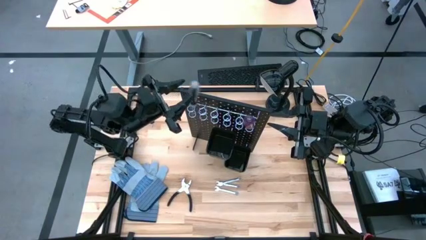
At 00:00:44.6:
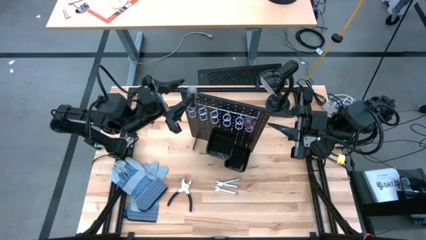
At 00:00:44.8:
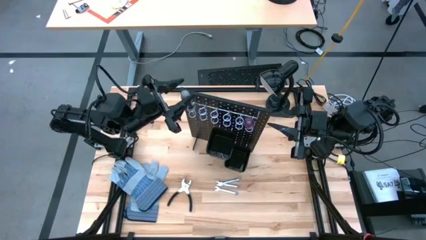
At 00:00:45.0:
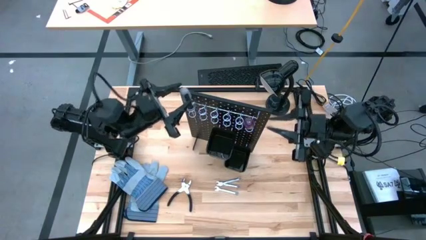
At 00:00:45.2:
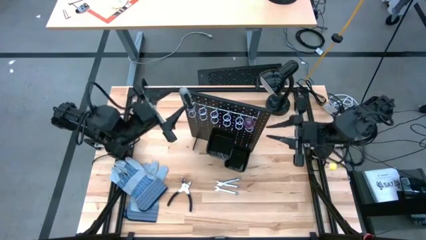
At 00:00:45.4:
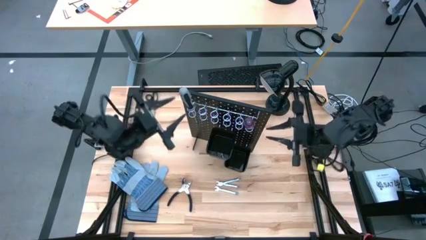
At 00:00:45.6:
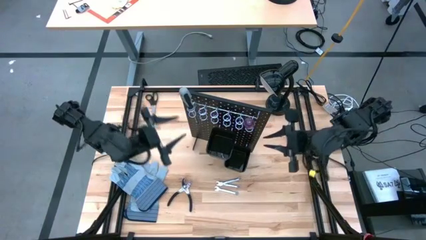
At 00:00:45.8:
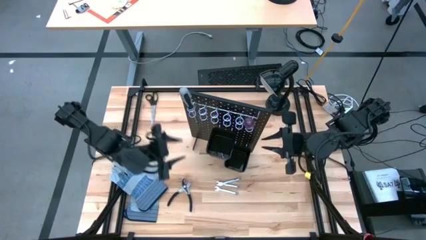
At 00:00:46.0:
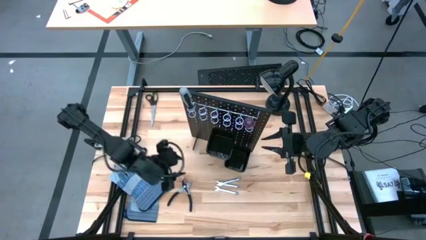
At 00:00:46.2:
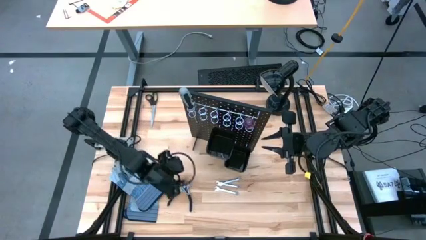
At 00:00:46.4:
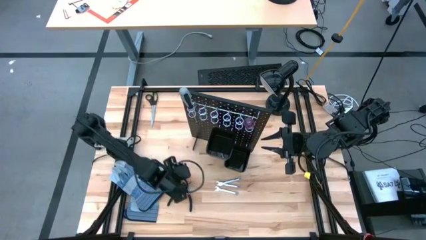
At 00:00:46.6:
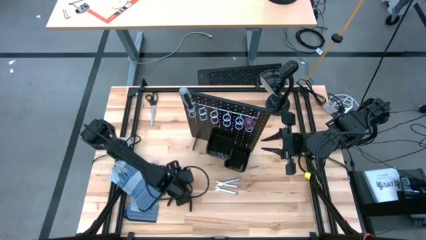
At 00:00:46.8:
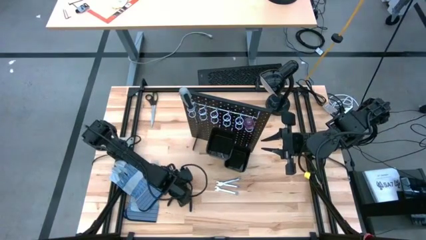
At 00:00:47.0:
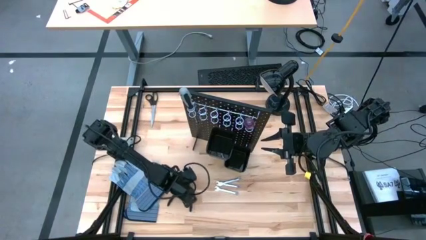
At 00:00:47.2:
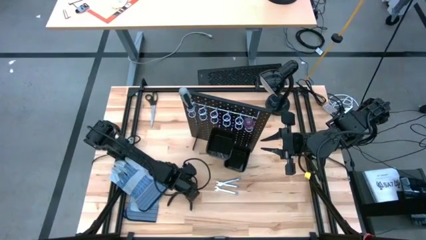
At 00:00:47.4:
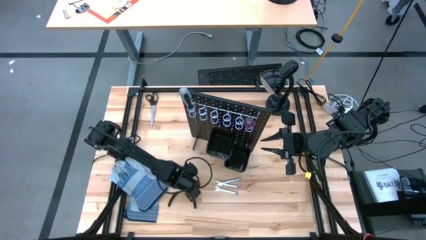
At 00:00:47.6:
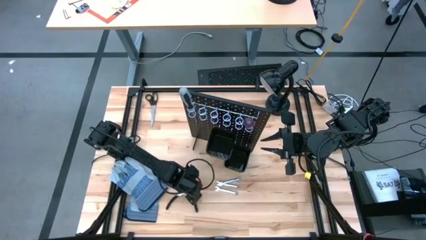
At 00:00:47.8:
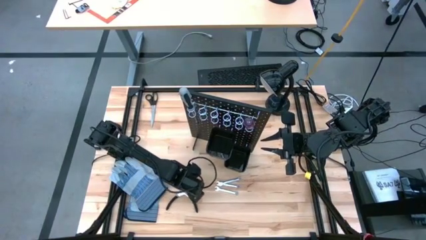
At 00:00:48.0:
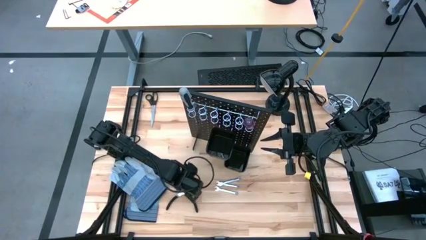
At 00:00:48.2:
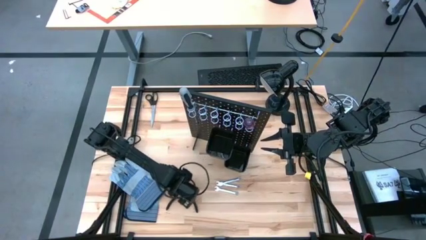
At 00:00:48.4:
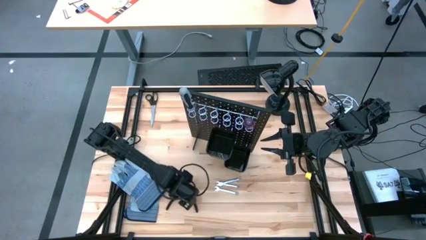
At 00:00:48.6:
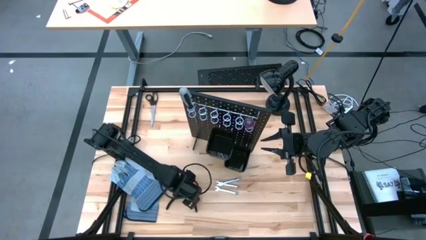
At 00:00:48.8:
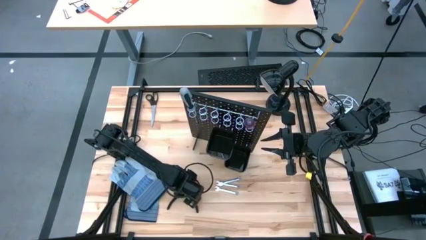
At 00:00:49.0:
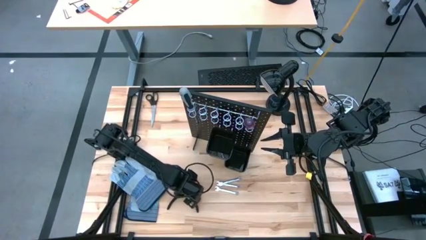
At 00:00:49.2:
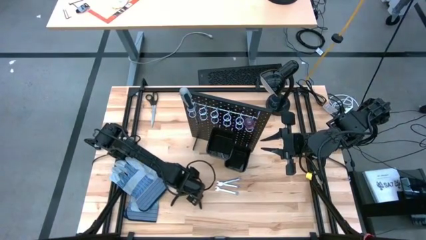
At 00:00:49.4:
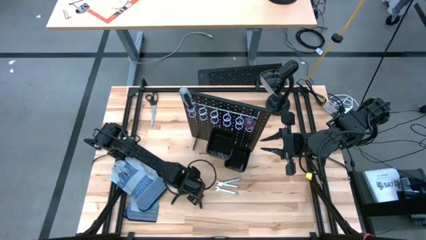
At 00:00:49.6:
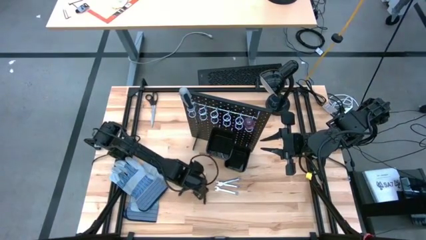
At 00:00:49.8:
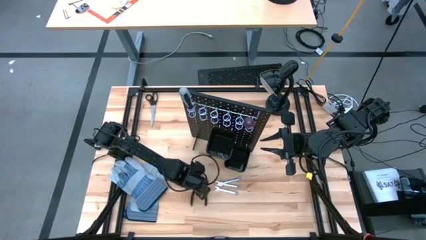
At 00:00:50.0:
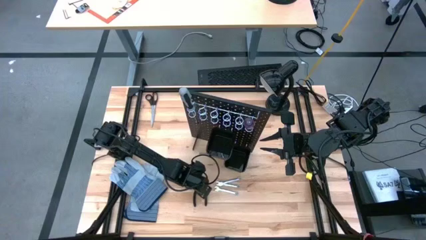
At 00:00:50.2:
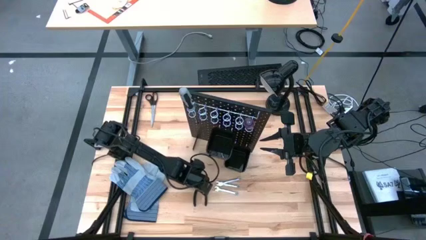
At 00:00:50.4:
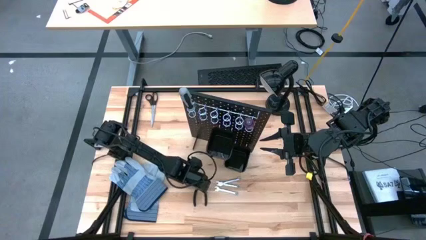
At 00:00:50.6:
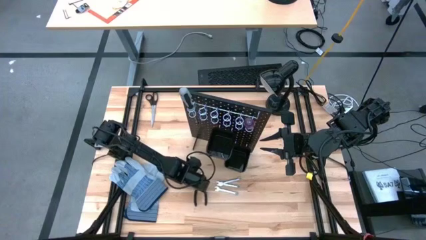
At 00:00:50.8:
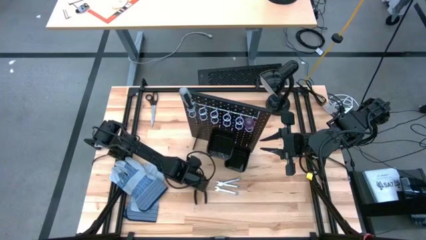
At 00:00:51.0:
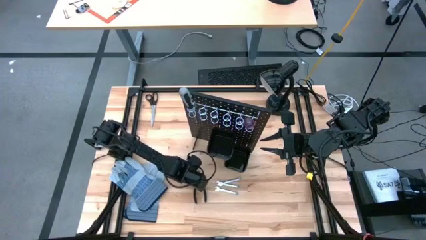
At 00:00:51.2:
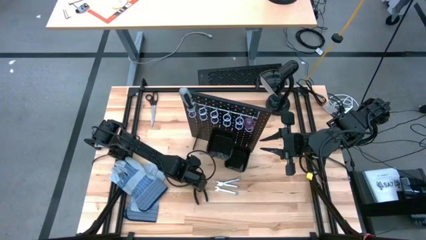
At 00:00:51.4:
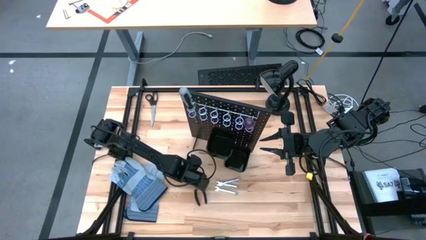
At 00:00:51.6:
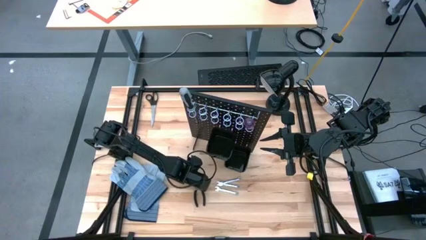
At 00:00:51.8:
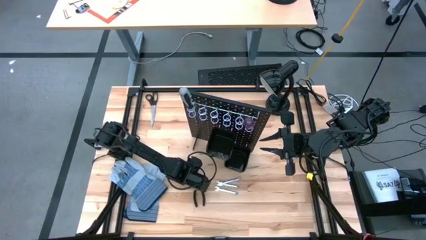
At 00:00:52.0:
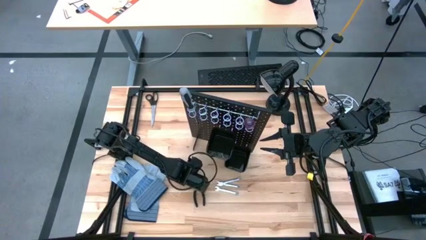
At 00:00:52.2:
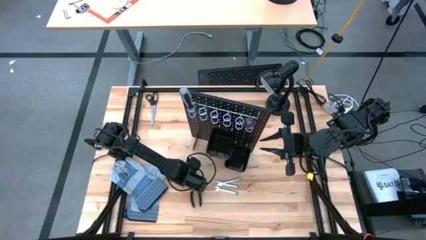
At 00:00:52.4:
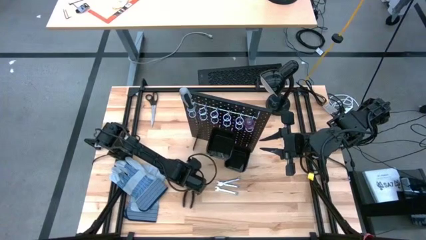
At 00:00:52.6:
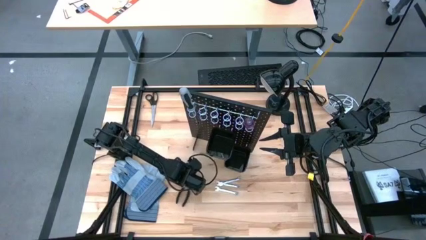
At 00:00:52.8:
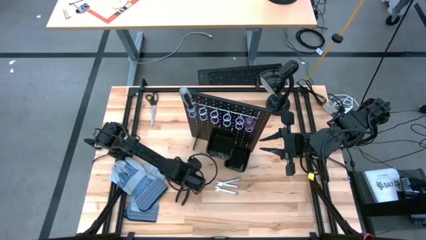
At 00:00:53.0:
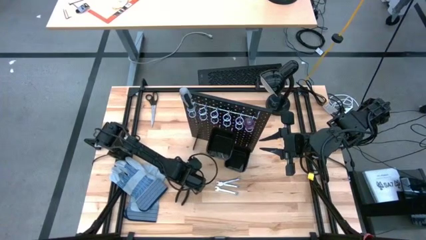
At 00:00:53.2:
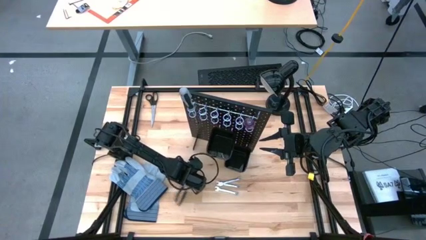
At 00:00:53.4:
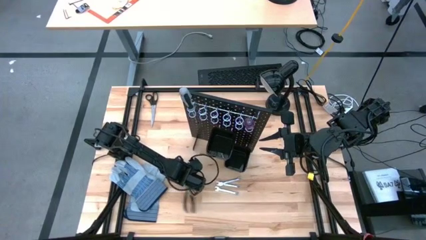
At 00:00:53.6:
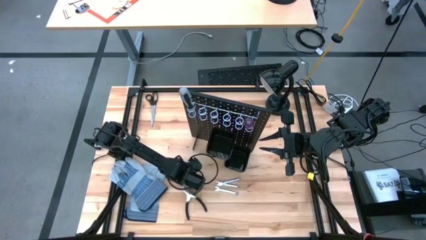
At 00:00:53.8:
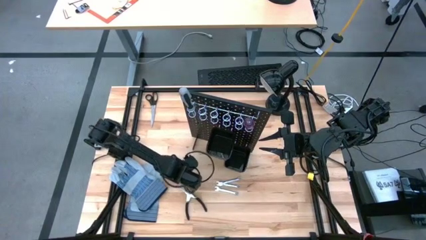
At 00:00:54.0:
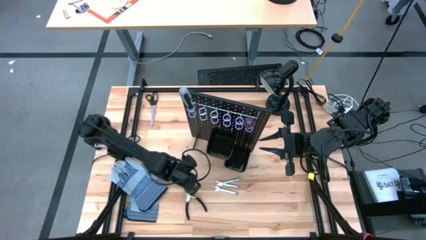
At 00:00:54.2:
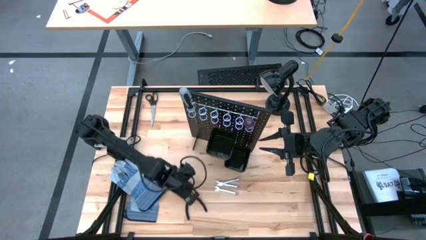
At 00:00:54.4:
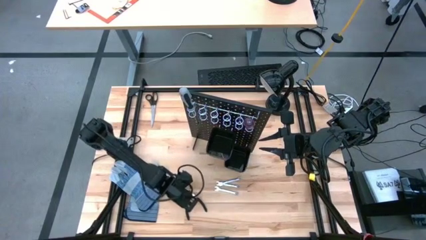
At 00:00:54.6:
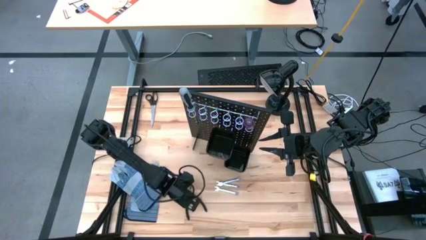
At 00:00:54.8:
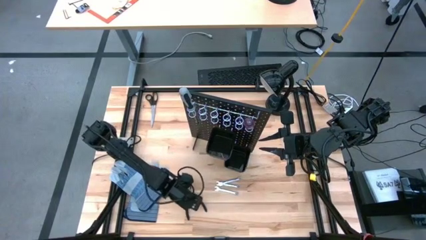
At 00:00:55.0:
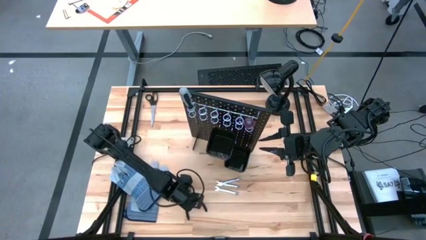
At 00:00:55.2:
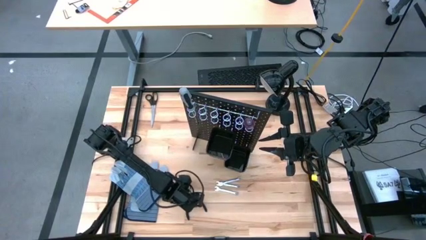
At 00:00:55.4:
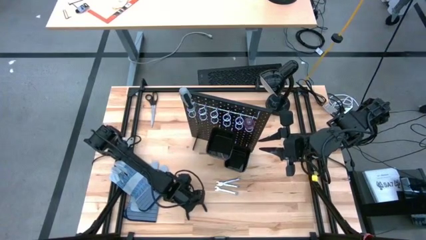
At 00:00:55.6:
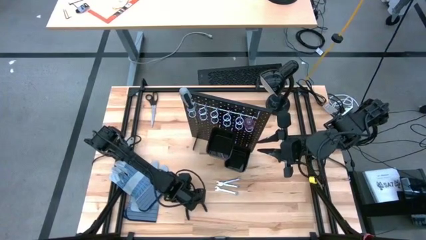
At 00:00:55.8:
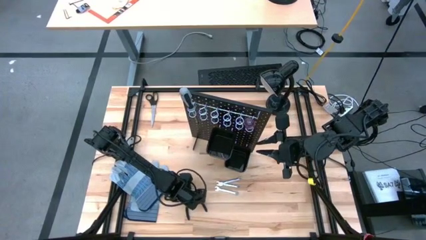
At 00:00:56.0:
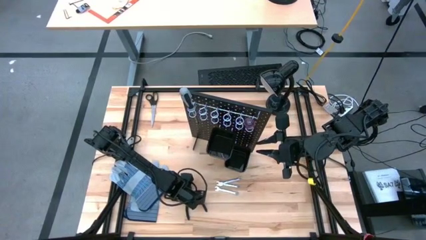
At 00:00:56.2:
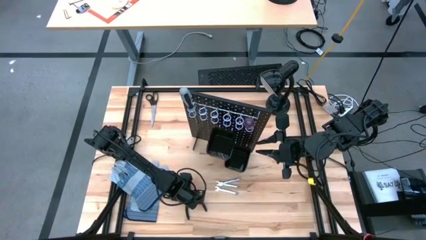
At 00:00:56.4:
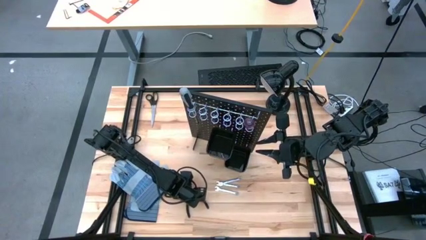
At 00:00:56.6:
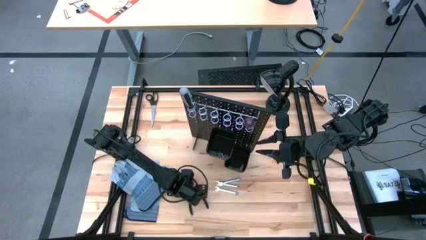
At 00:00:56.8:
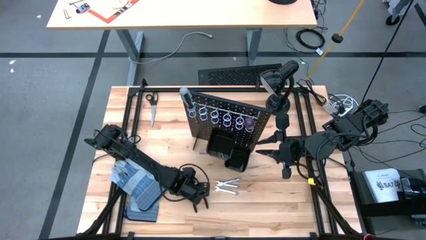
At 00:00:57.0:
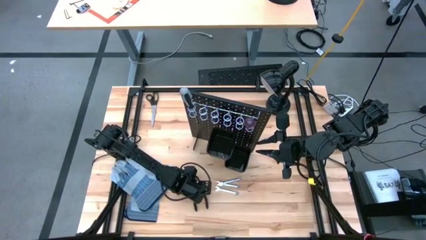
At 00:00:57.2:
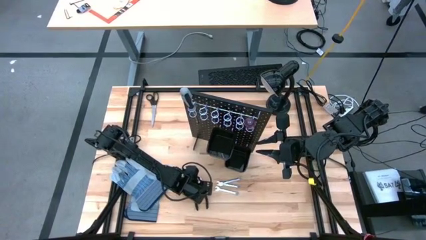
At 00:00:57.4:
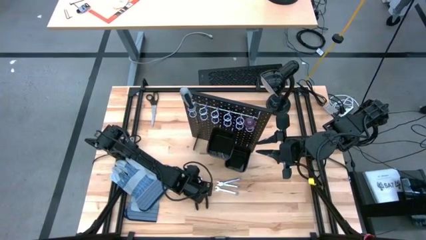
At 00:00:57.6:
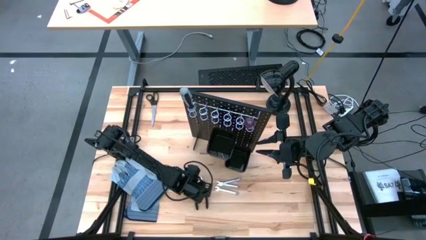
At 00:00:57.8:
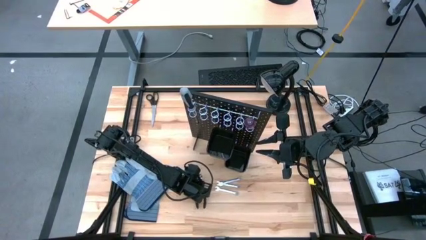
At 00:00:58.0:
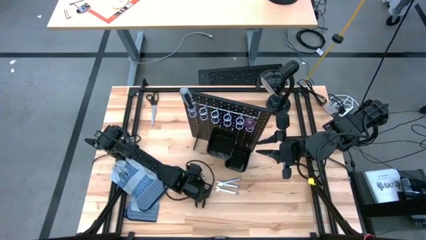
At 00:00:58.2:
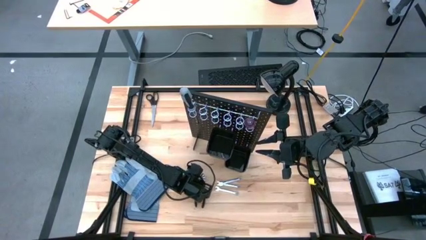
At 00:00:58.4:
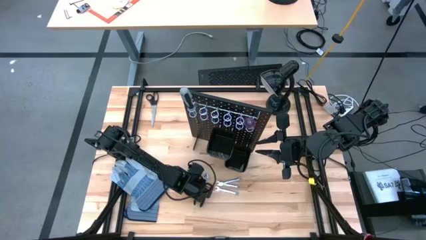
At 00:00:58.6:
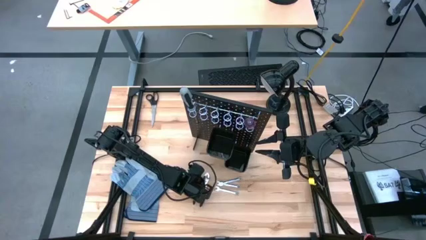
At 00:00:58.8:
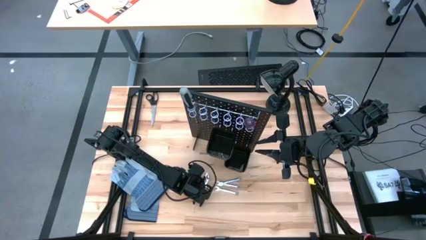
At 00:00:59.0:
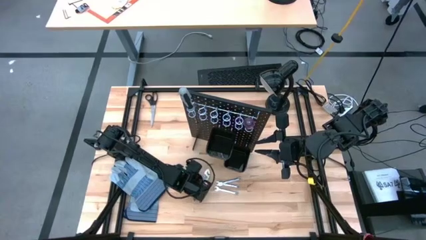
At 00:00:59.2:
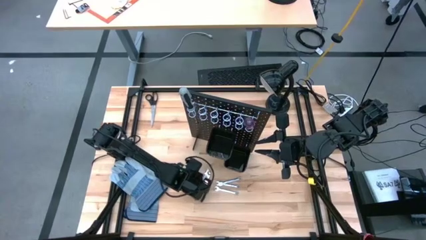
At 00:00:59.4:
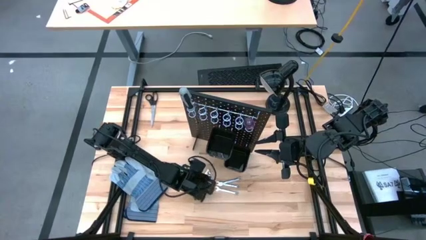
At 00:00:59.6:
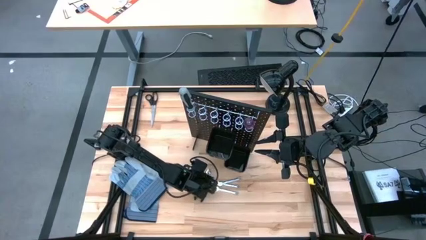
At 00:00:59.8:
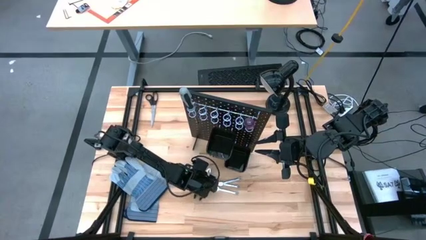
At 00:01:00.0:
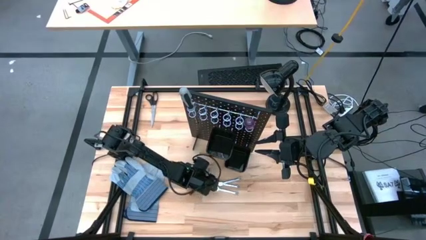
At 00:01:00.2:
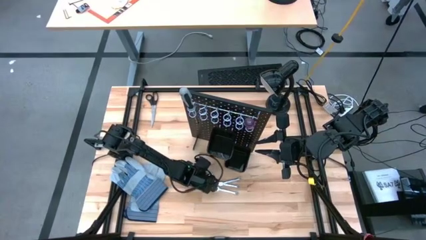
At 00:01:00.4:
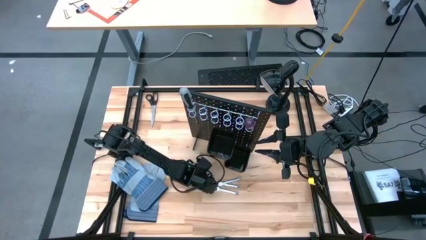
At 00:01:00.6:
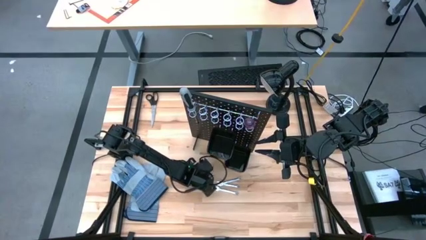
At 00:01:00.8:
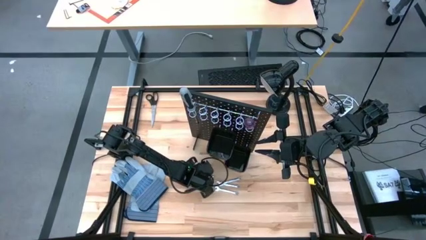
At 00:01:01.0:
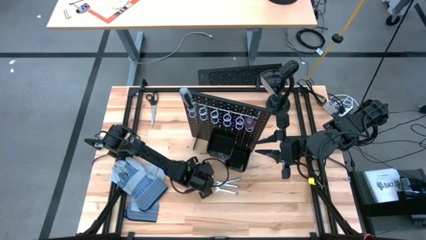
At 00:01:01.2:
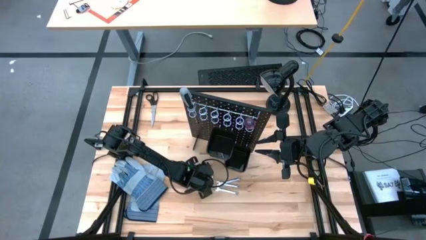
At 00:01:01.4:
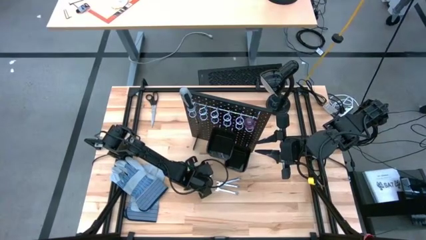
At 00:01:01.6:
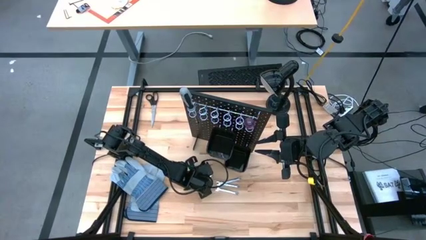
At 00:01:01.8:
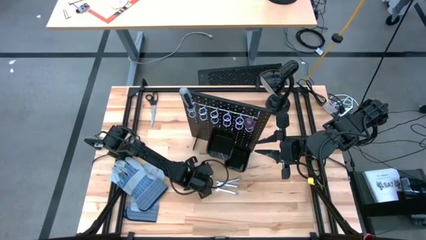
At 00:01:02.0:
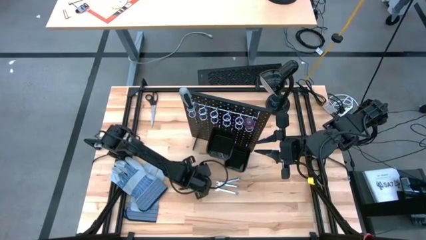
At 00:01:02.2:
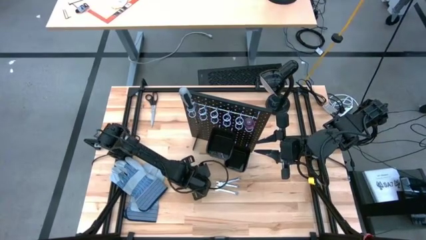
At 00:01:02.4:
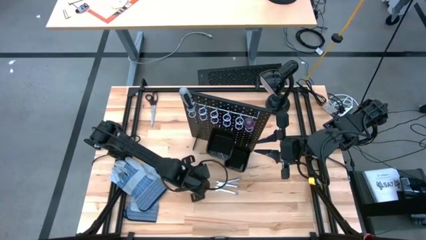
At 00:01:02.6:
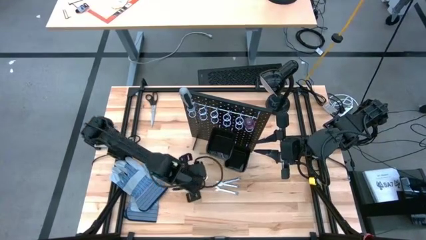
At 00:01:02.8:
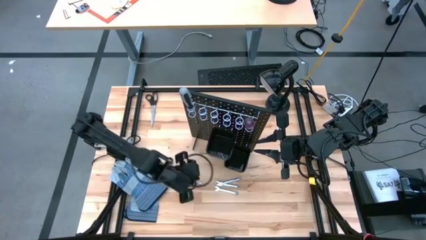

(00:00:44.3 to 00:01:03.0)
Task: Hang tools onto peg board
Hang the black pliers on the black peg board
